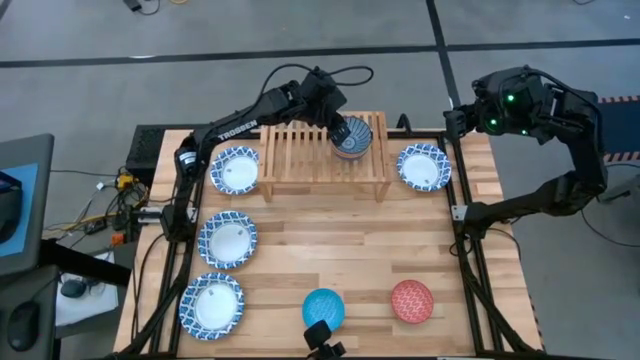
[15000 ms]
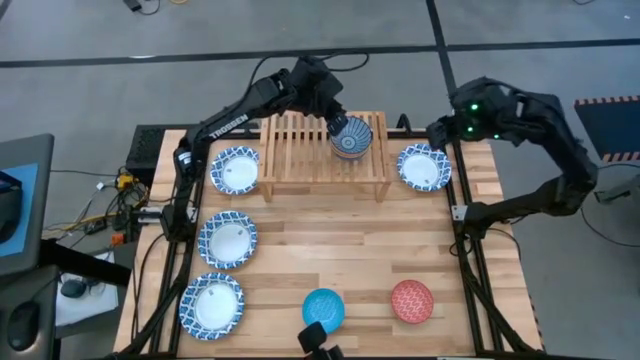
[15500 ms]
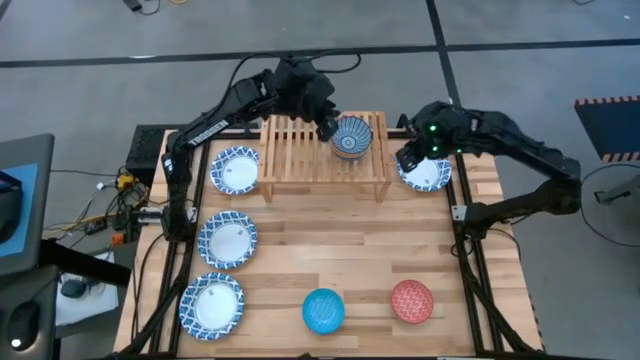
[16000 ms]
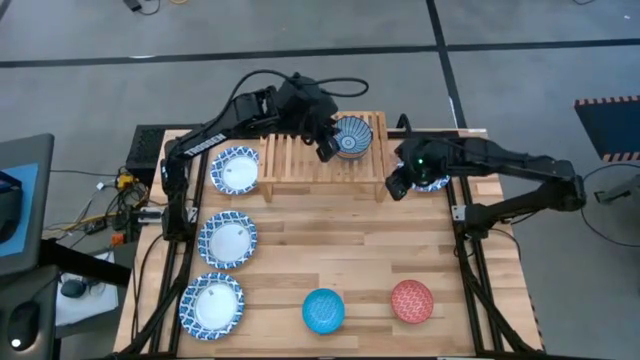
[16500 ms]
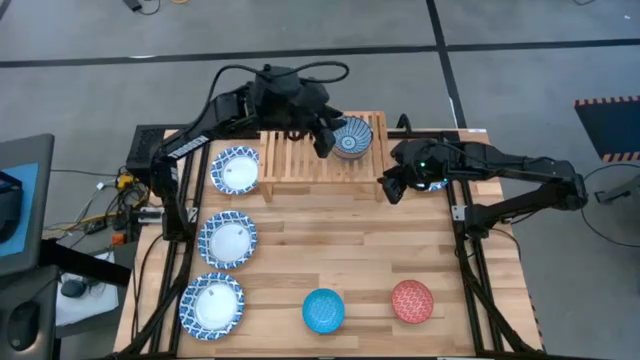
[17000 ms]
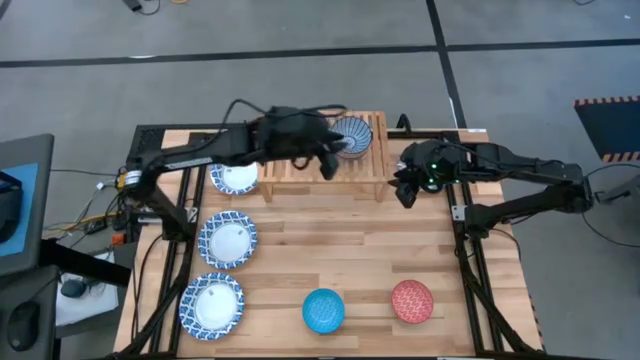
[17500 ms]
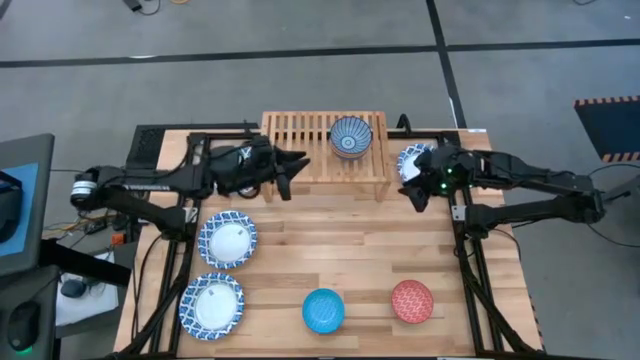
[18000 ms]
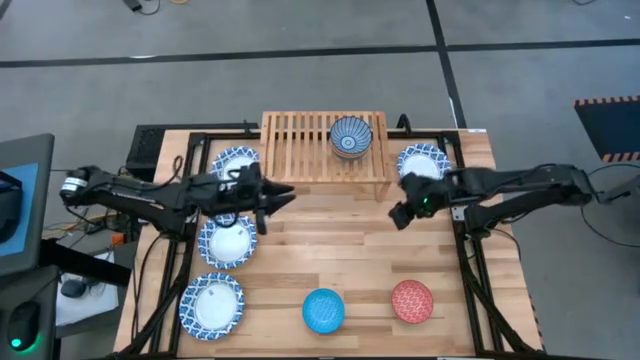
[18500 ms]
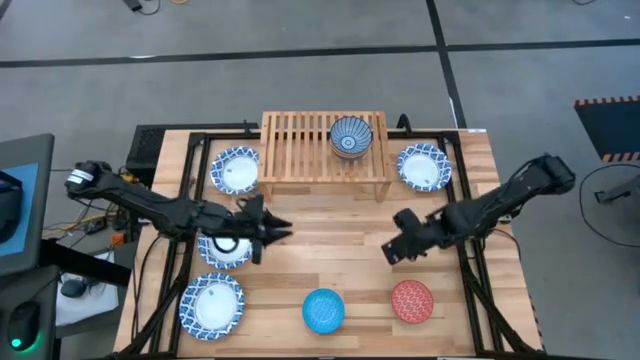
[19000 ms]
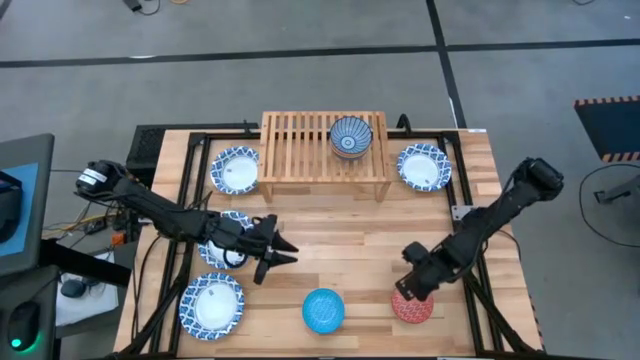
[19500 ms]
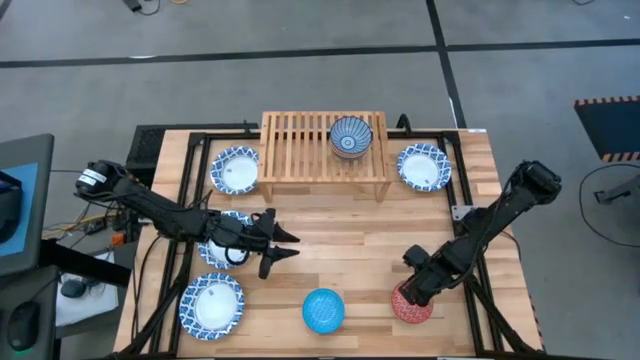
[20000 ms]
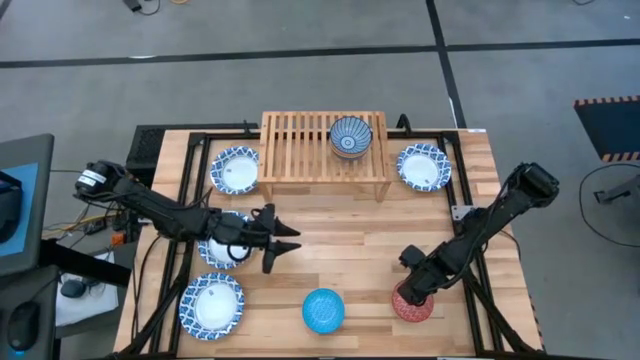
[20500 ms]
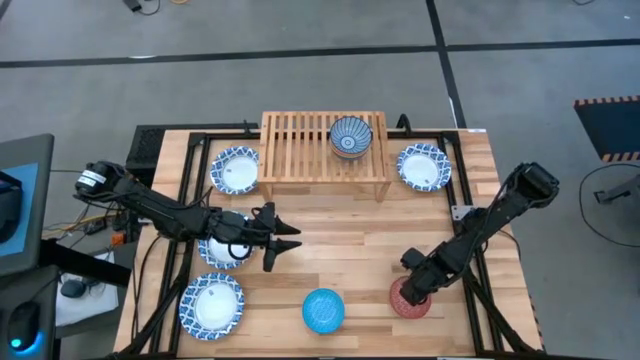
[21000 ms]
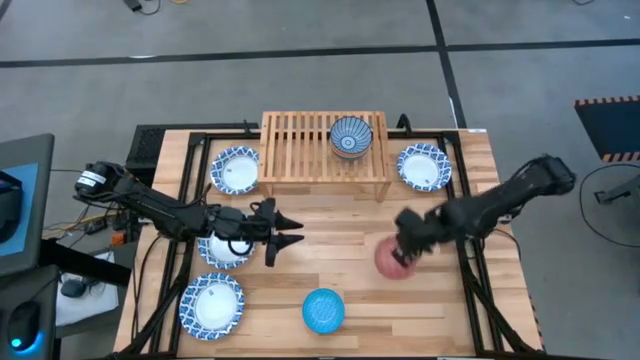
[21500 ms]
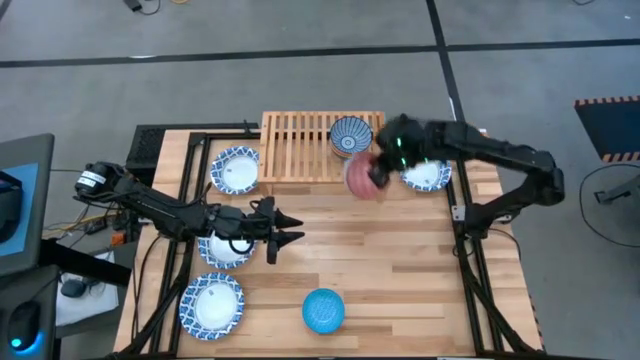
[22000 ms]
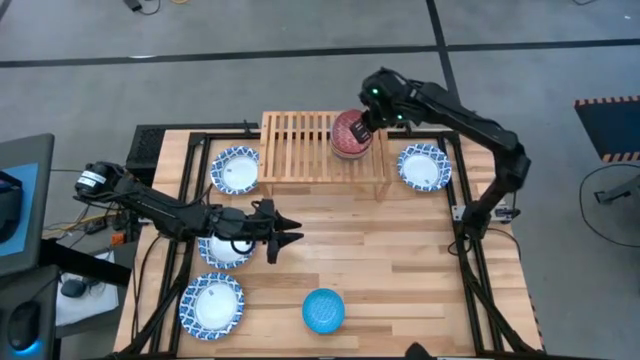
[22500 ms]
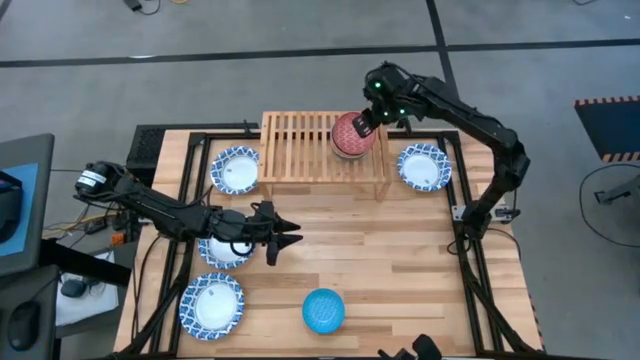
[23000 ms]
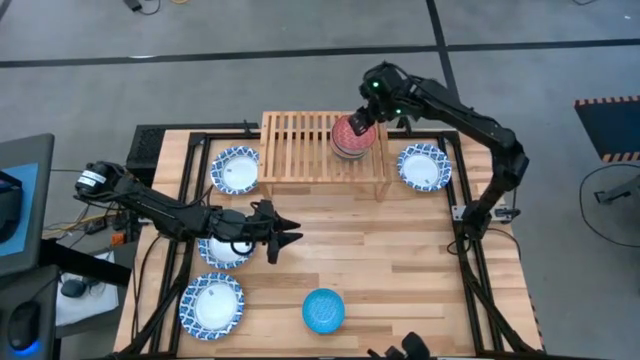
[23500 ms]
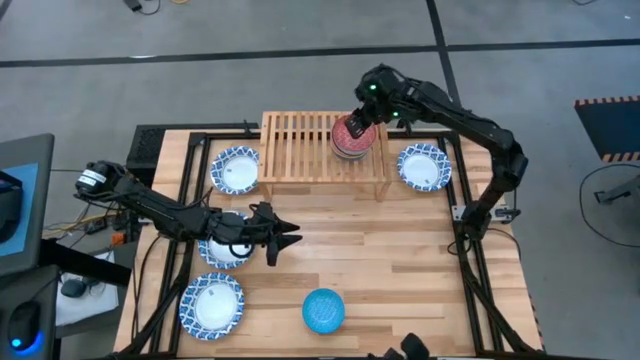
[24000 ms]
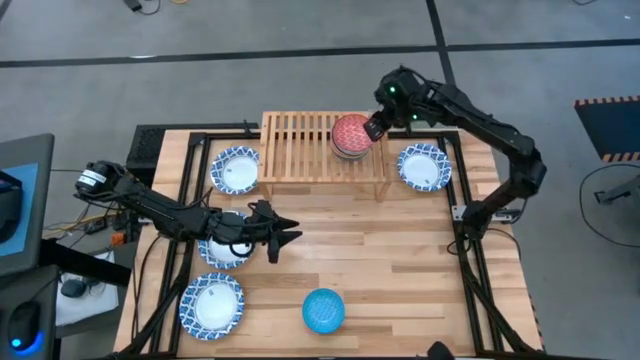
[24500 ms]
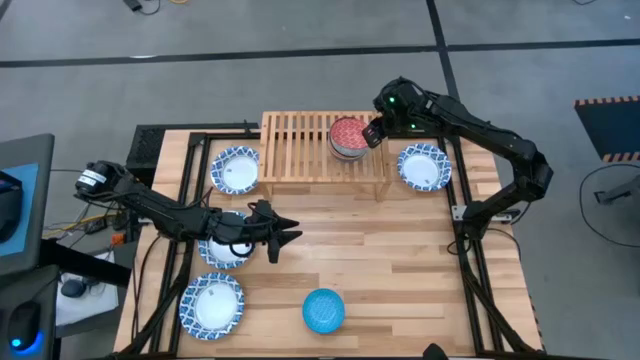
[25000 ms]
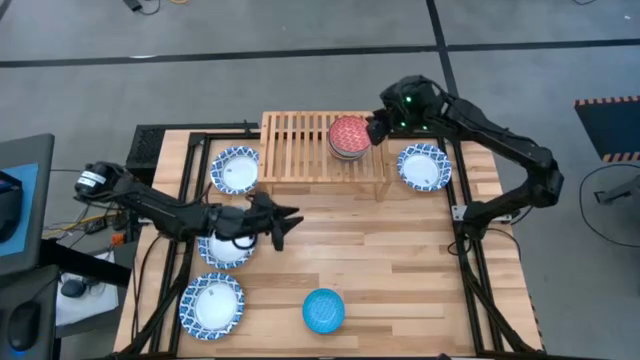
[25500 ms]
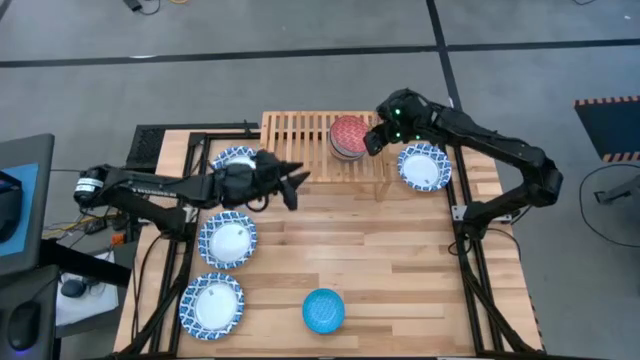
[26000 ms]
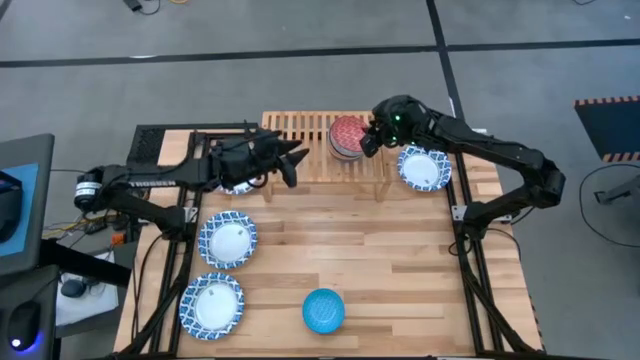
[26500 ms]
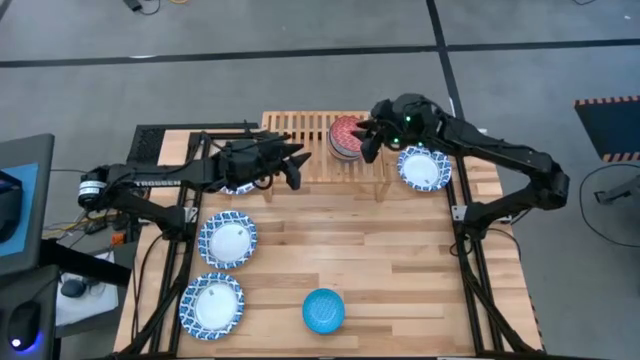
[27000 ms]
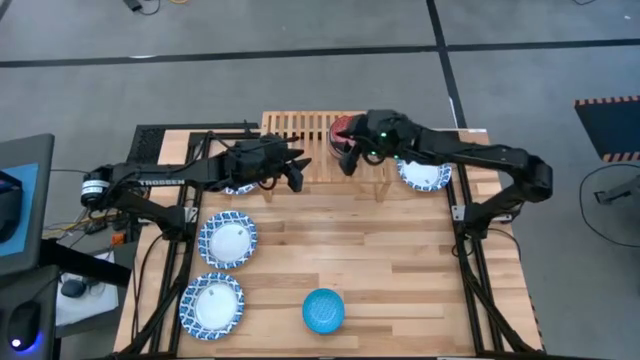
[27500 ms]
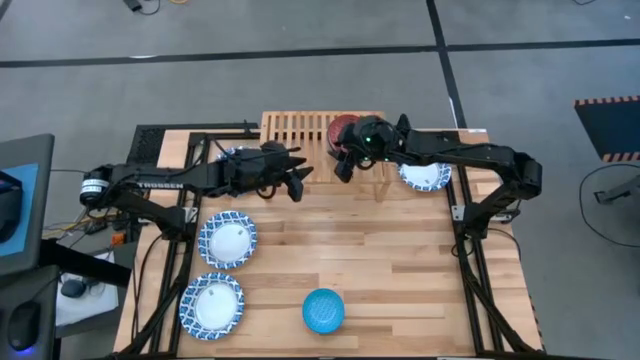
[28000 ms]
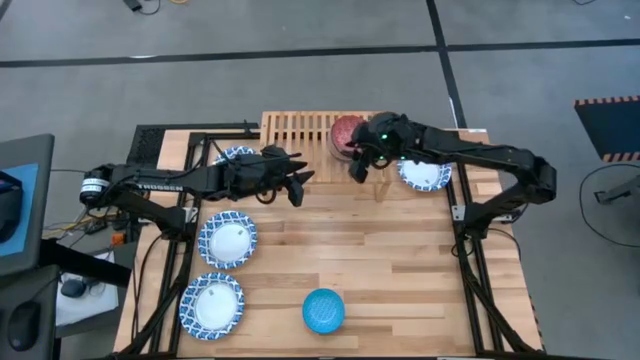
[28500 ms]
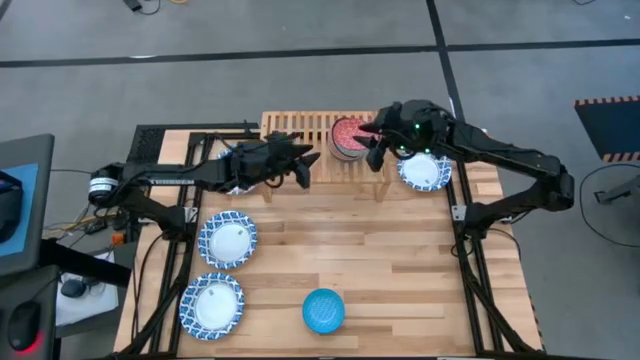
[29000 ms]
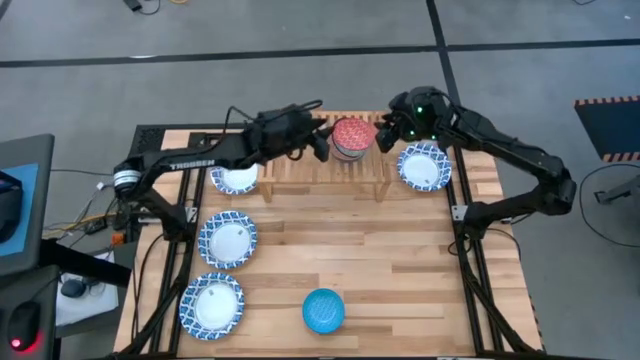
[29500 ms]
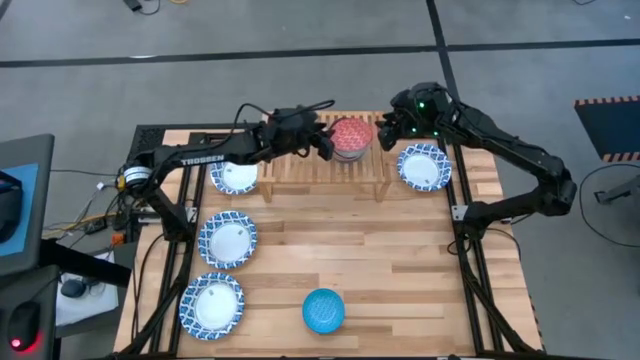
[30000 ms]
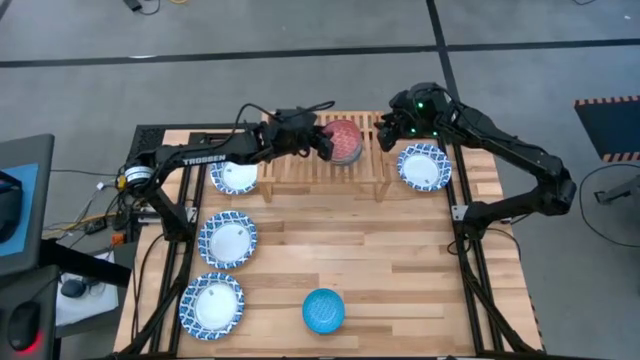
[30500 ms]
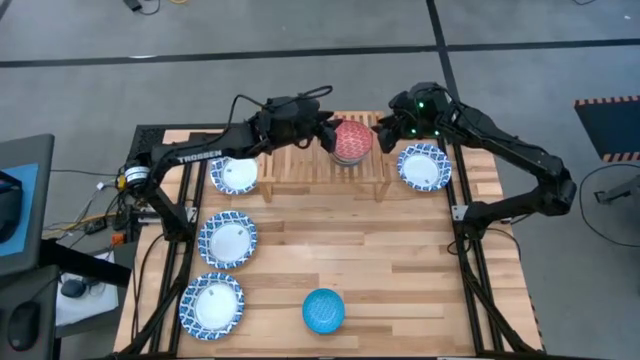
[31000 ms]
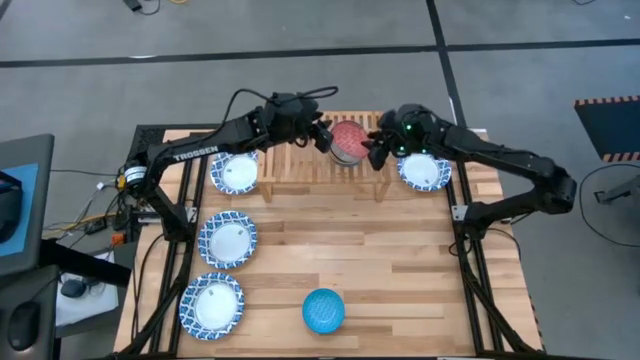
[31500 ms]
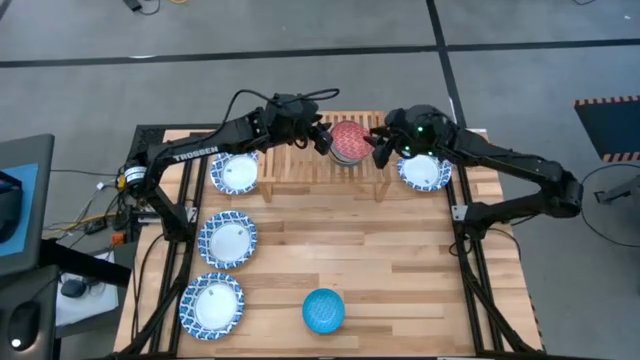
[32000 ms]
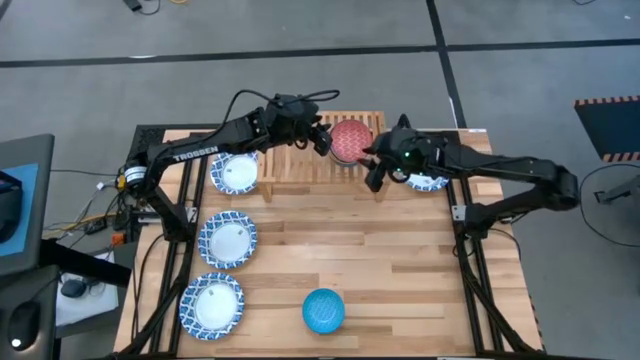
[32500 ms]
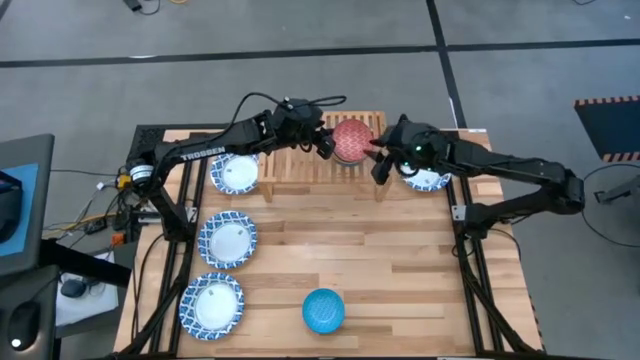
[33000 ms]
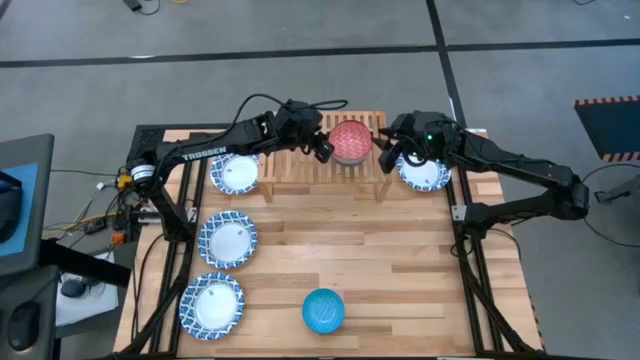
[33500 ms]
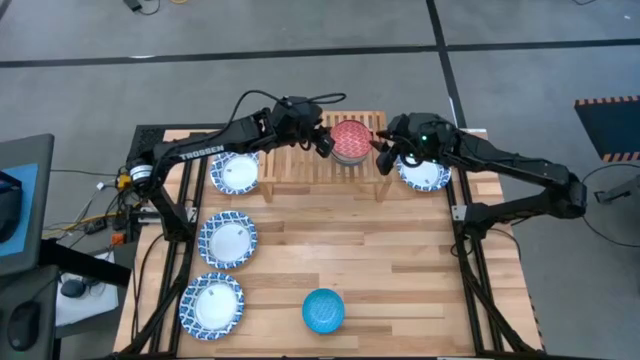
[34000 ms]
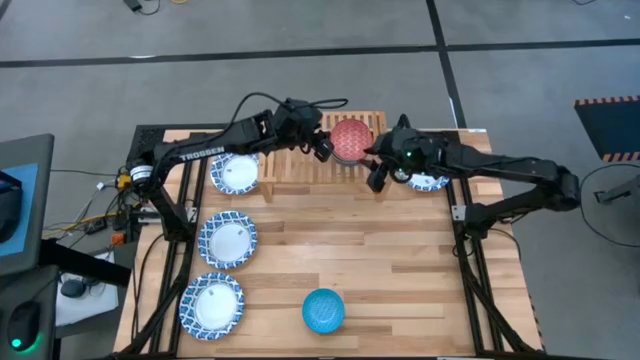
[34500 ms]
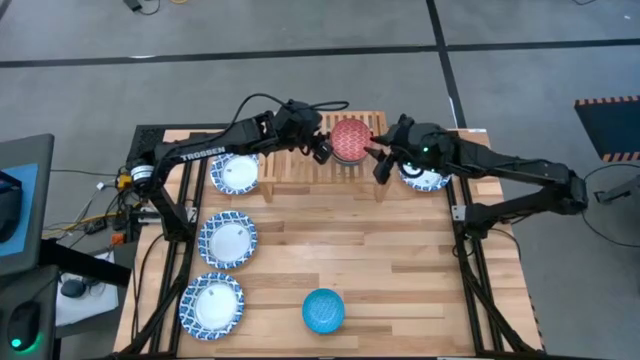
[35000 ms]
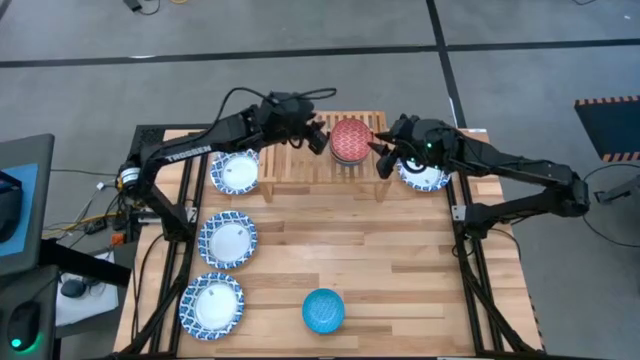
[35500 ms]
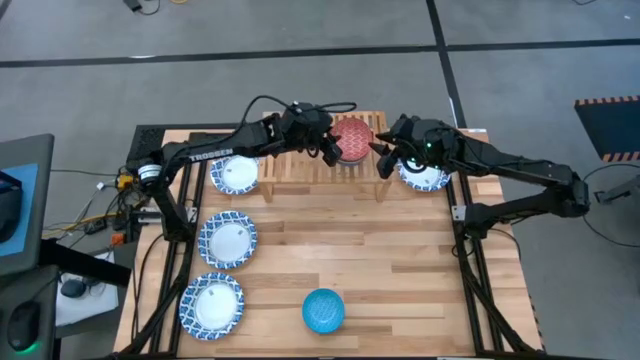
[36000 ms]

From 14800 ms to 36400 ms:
Task: Place and stack bowls onto a shelf
Stack the red bowl on top of the blue bowl
